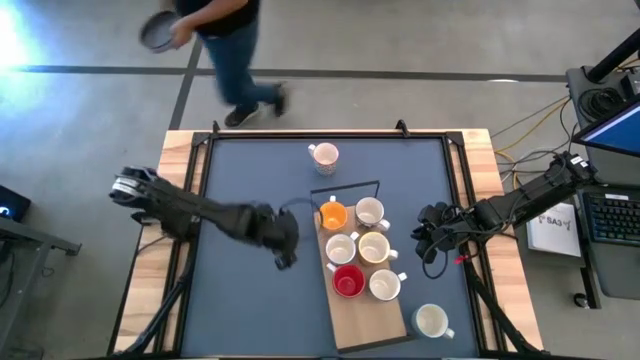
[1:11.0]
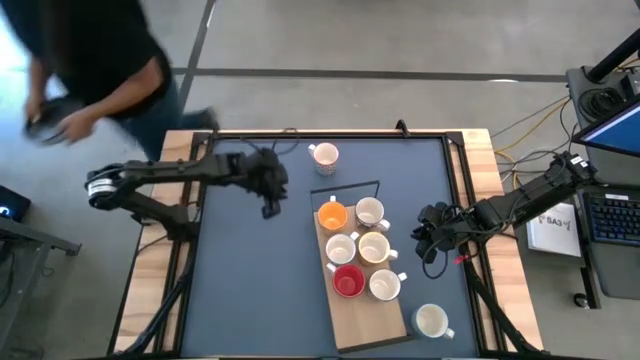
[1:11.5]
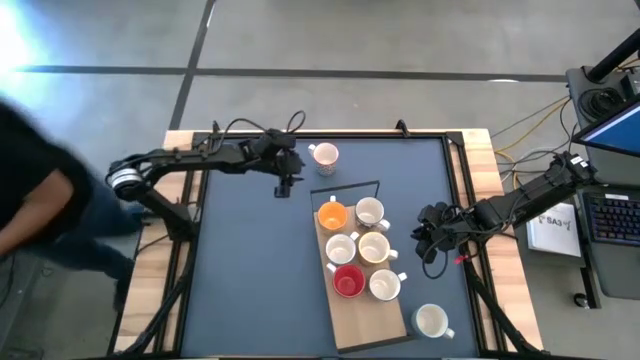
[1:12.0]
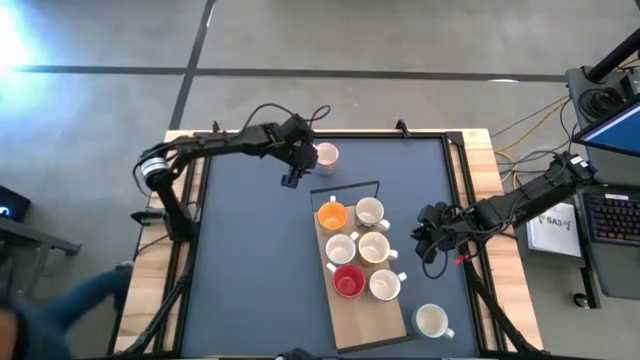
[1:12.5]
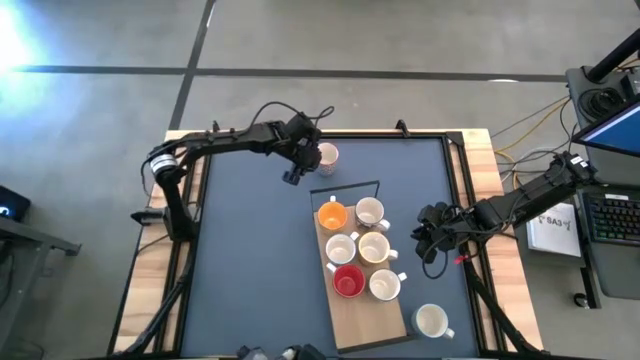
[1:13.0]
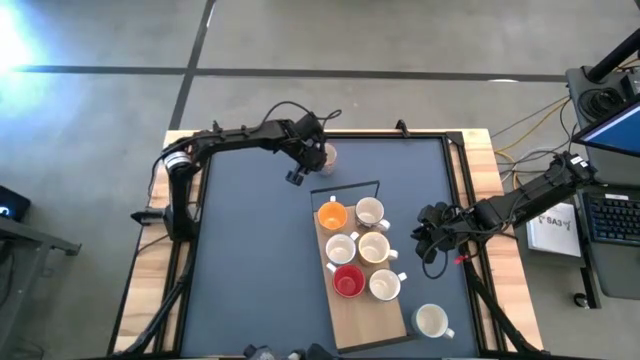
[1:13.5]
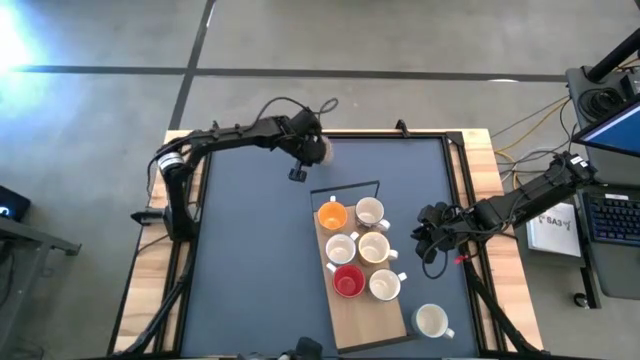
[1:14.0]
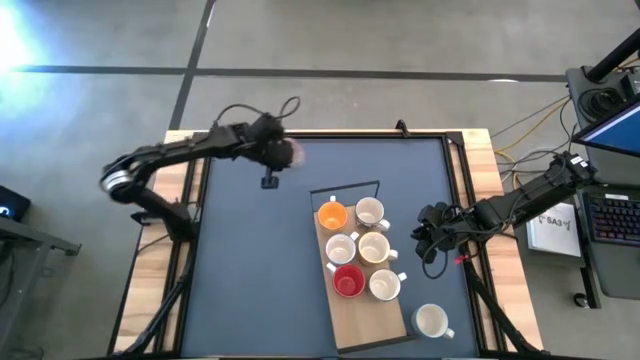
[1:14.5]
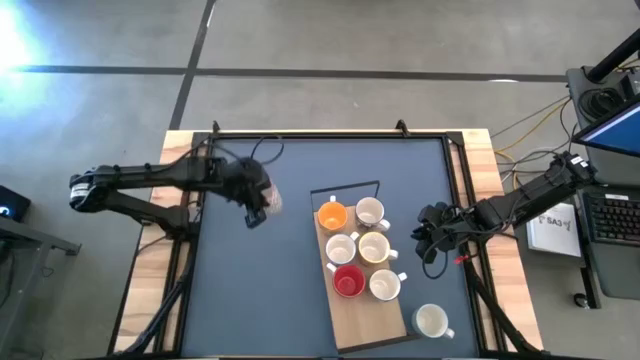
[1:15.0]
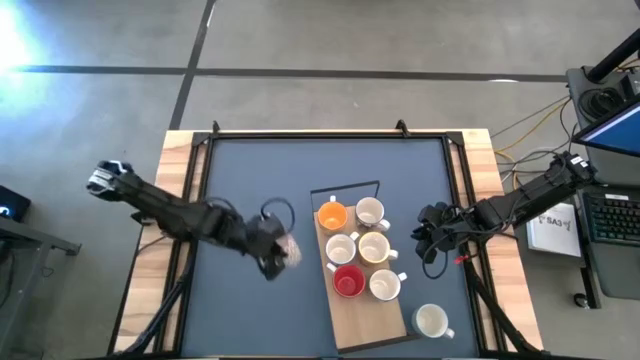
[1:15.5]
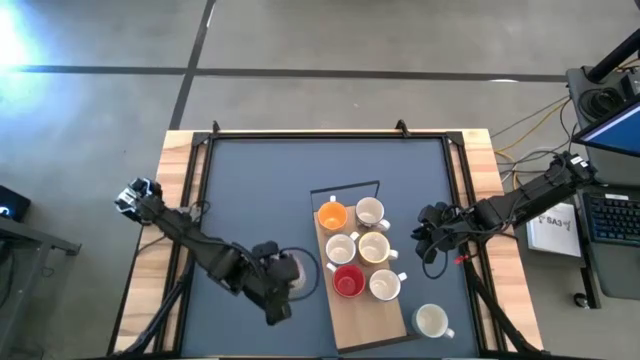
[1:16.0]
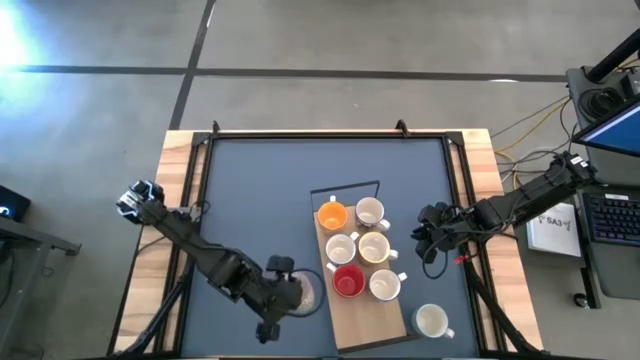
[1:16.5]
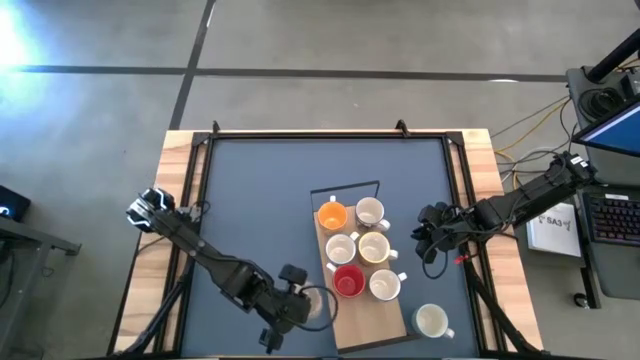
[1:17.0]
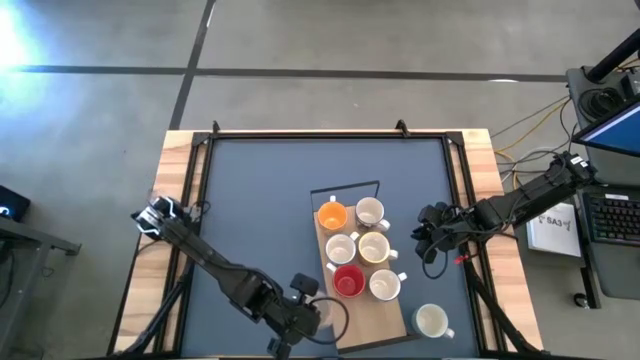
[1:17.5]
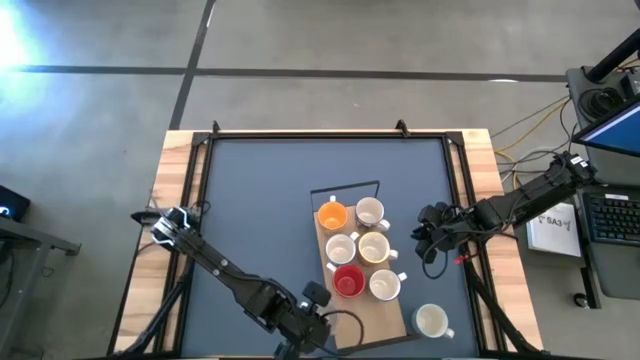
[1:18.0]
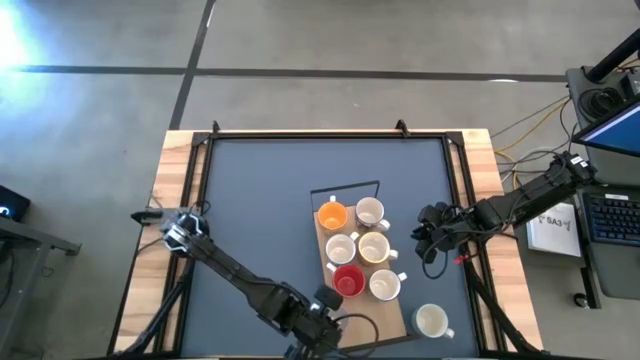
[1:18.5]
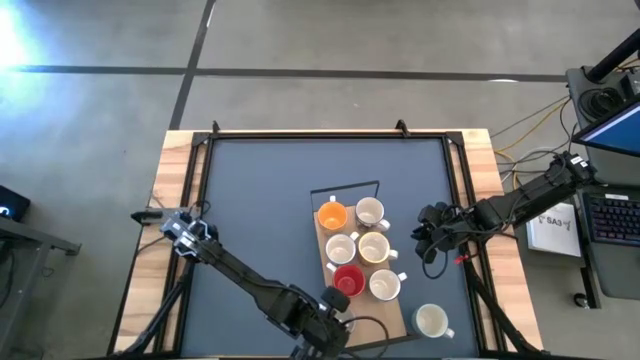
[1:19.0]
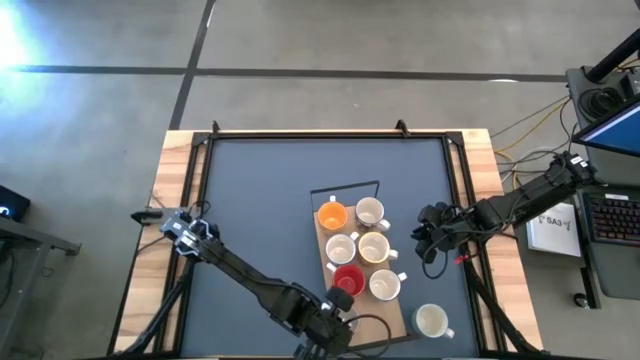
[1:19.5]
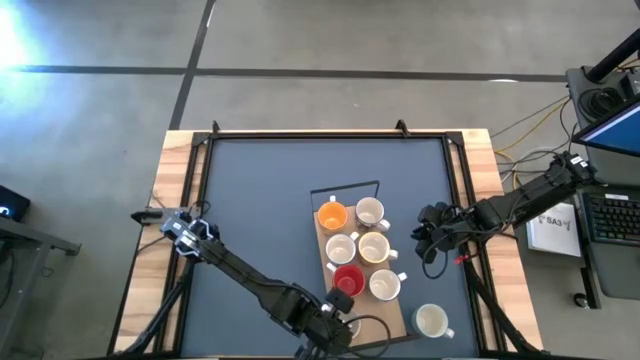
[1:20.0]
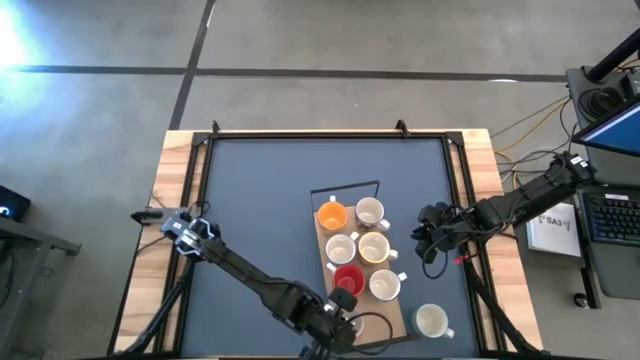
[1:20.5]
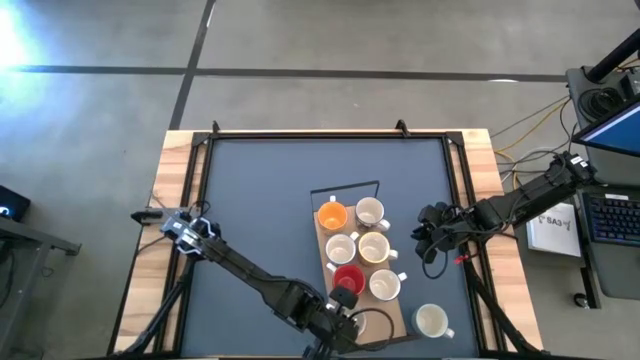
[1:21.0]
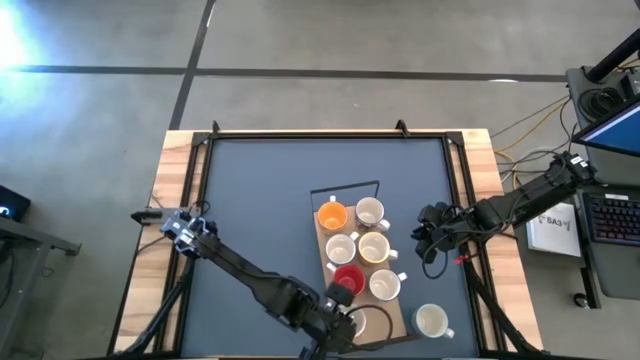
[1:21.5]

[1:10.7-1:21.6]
Task: Place coffee mugs
Put the gray mug on the shelf

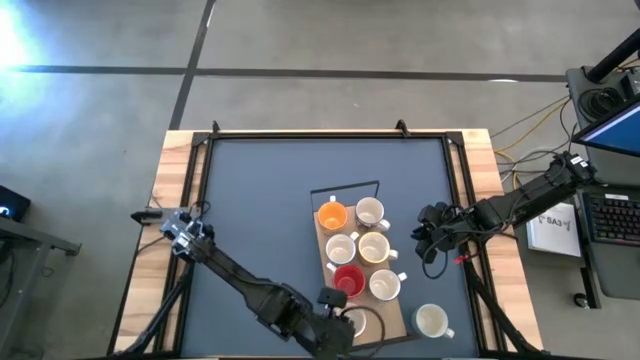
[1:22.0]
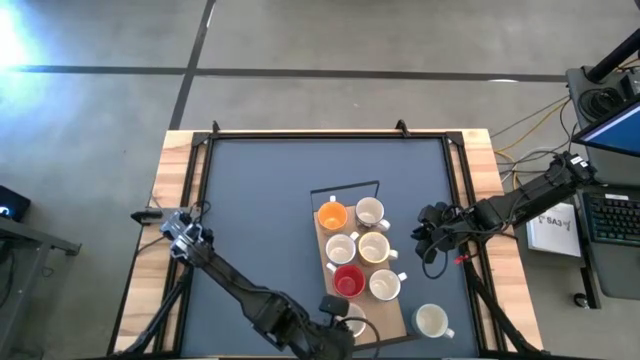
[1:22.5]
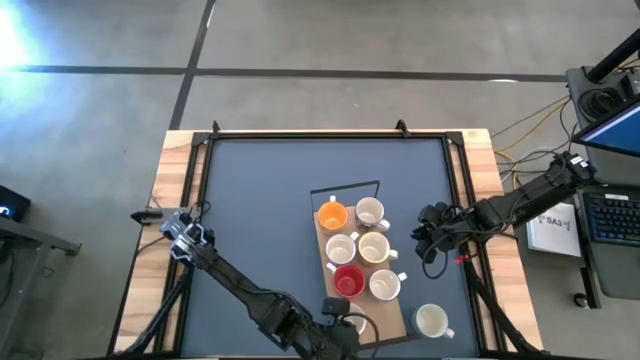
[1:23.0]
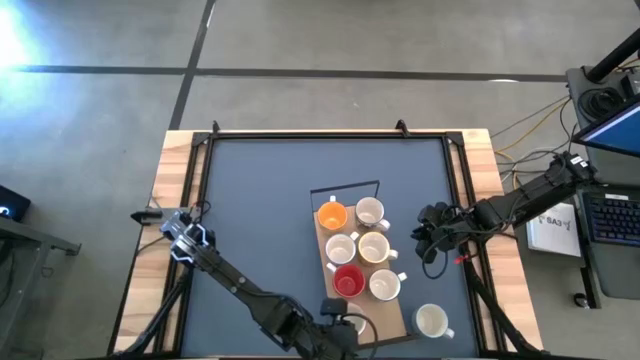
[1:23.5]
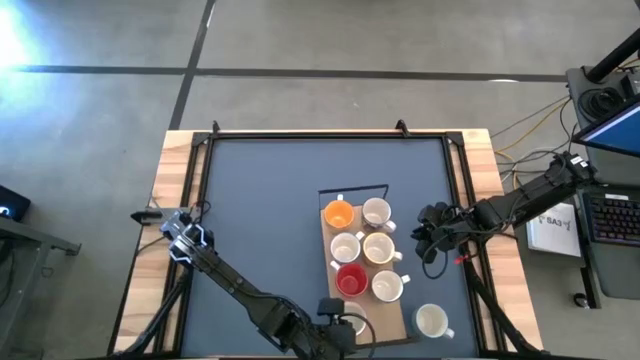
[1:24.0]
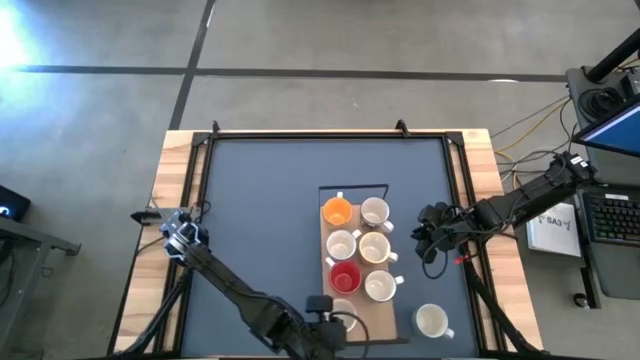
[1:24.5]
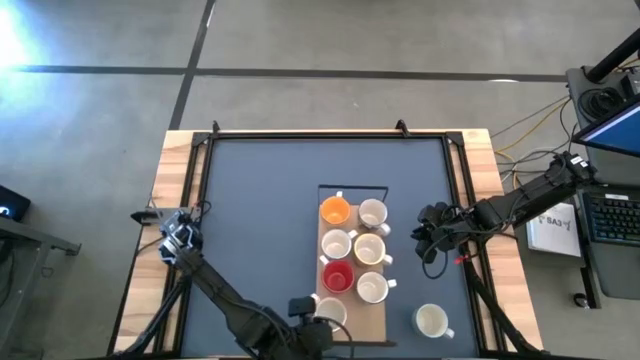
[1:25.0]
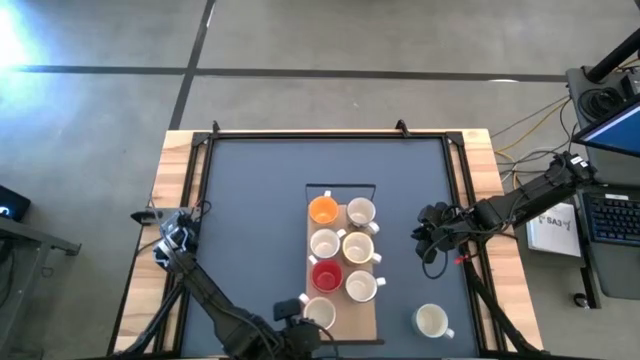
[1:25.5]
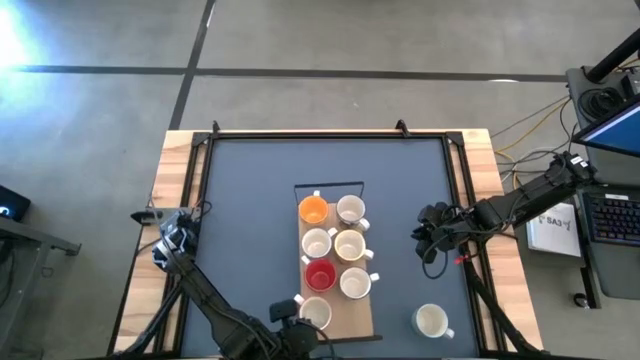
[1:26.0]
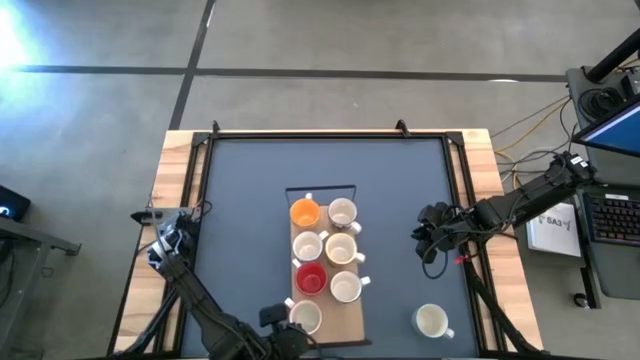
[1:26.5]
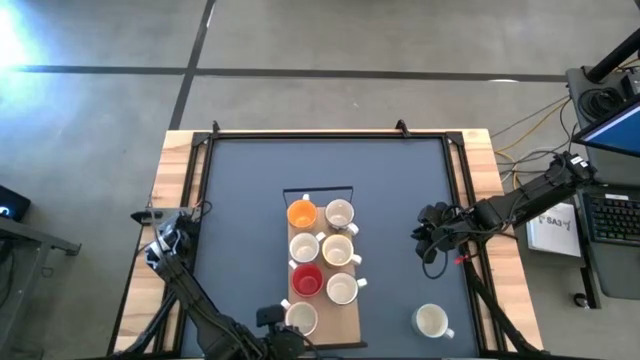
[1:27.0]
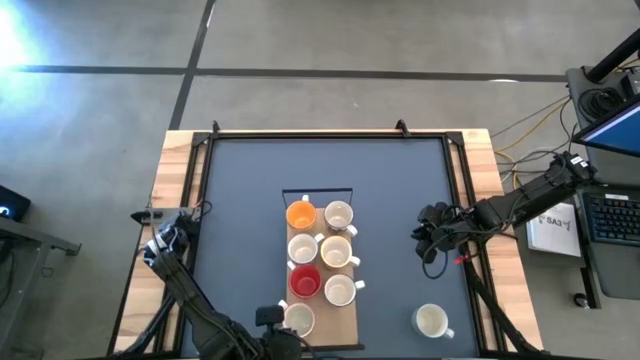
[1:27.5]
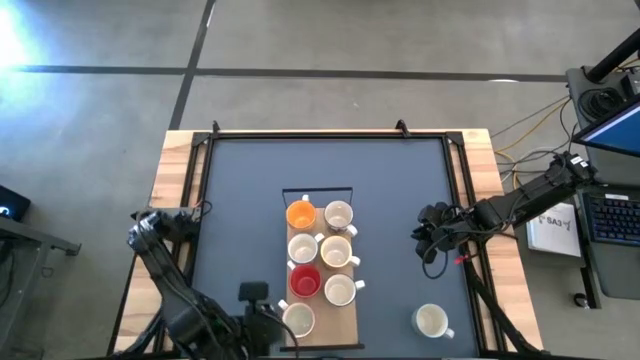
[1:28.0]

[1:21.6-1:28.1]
Adjust the shelf
